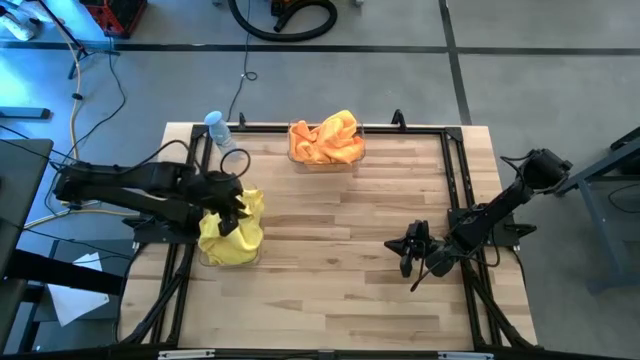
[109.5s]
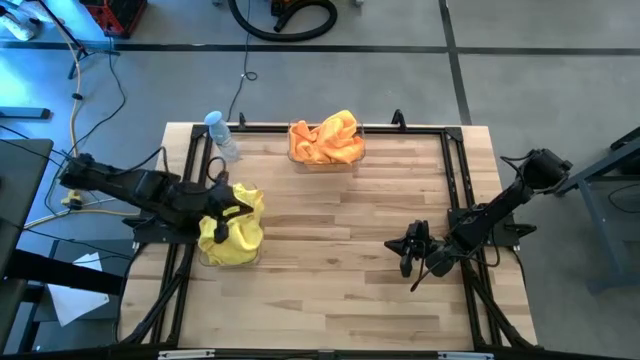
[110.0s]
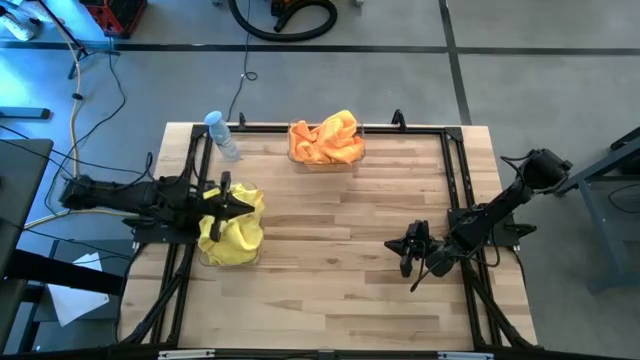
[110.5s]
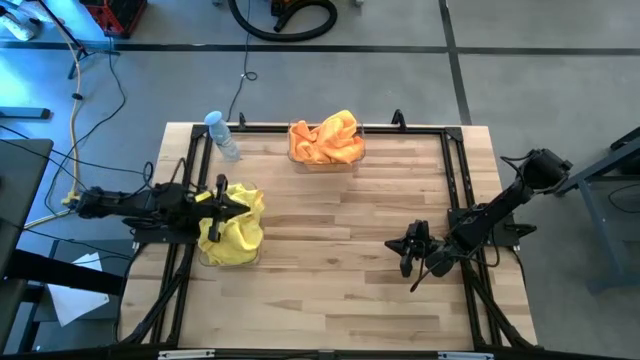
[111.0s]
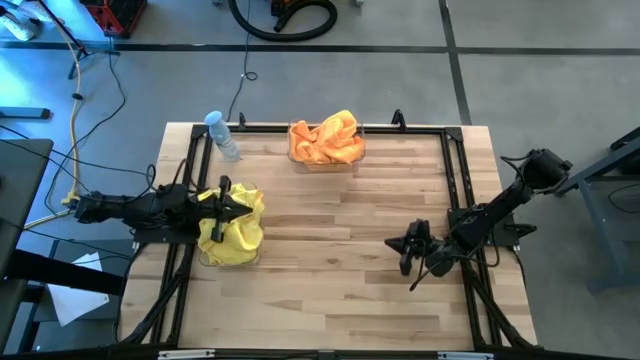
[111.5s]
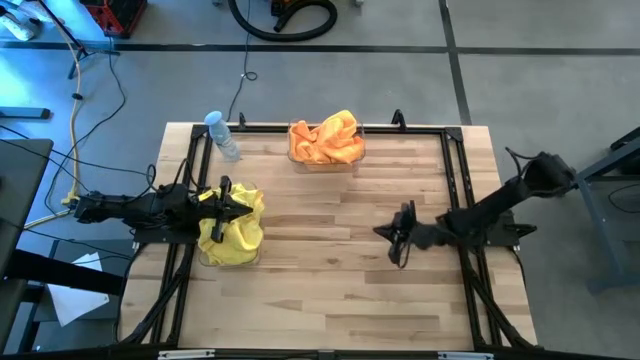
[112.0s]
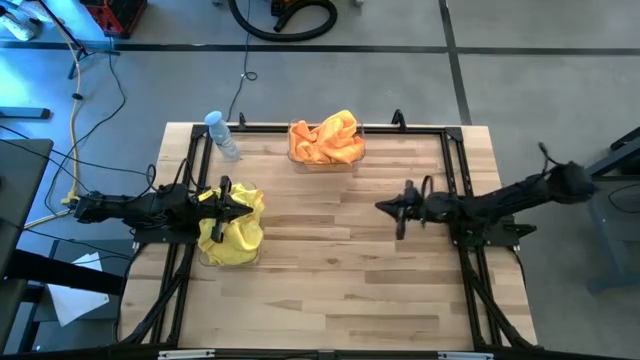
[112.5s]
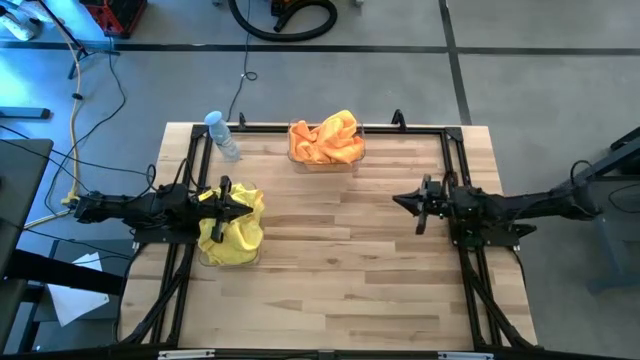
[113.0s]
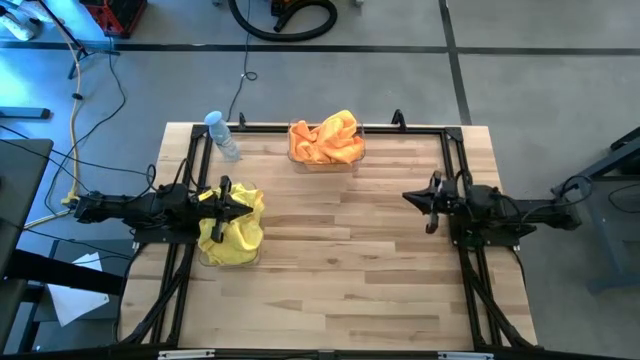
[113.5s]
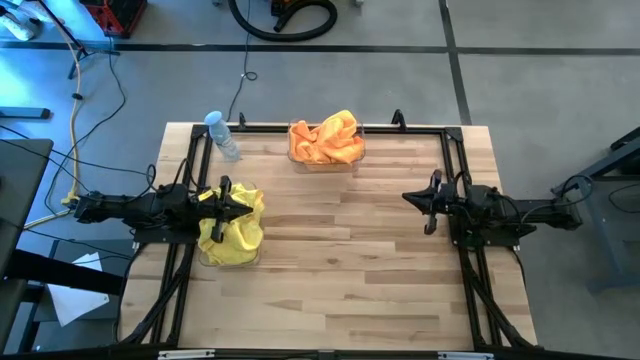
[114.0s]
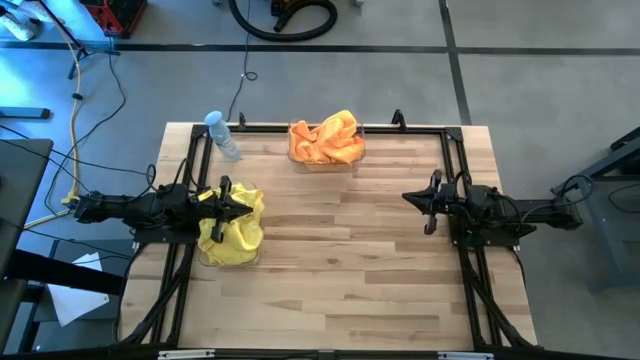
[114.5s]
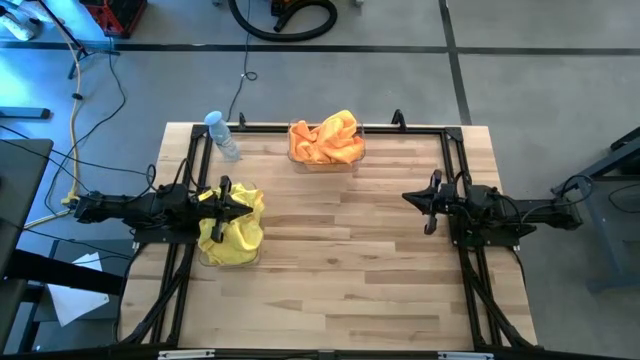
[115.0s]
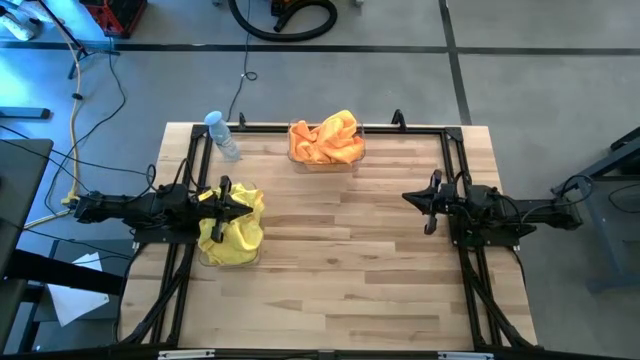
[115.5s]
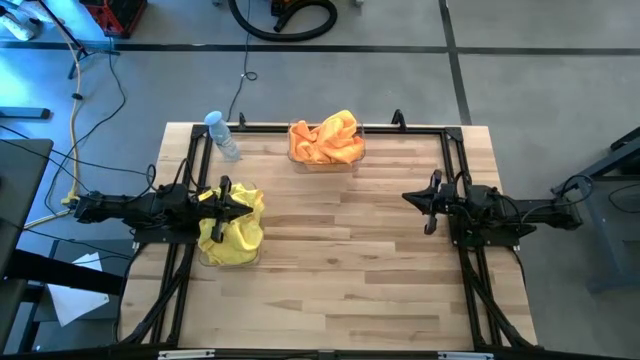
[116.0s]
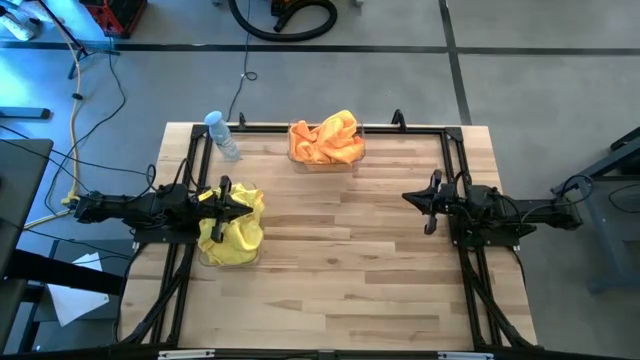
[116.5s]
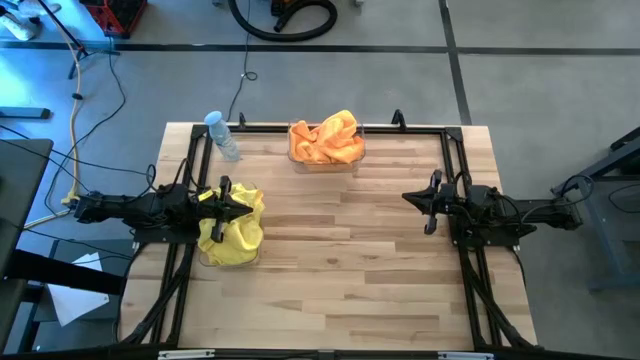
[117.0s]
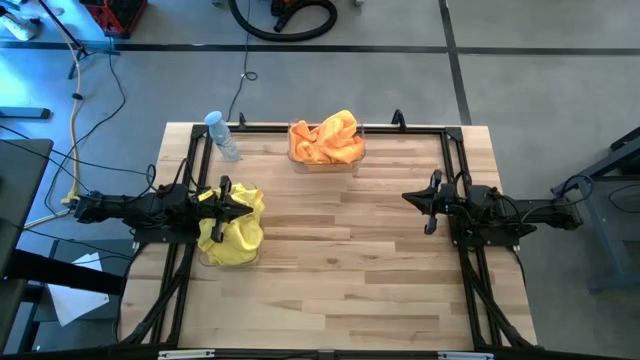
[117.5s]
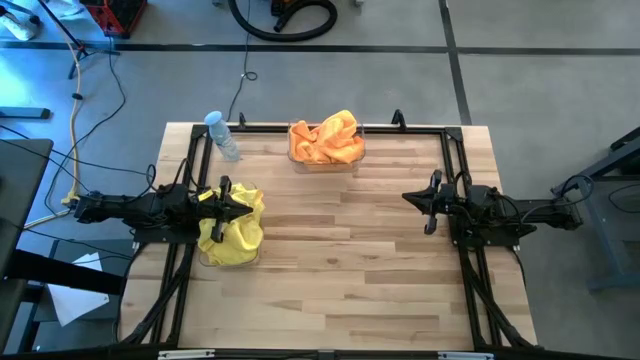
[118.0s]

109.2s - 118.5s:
Task: Sort microfiber towel by color & place in baskets
Return to Home Position

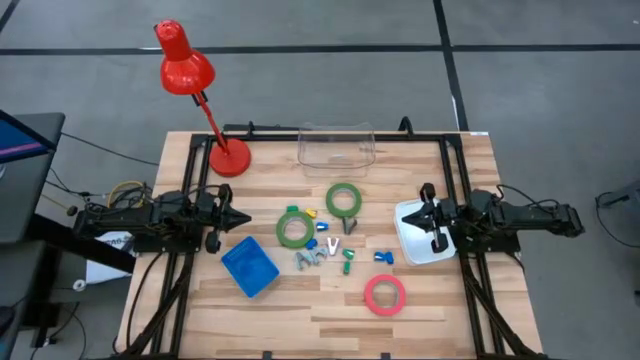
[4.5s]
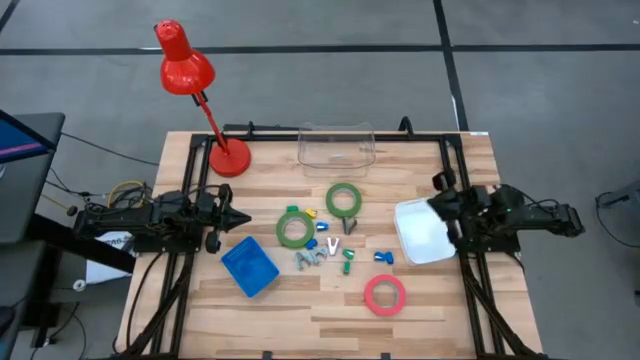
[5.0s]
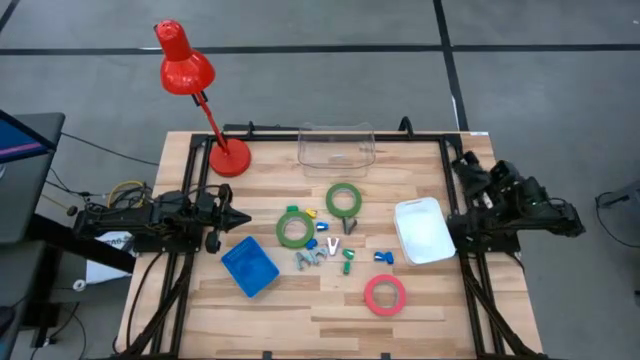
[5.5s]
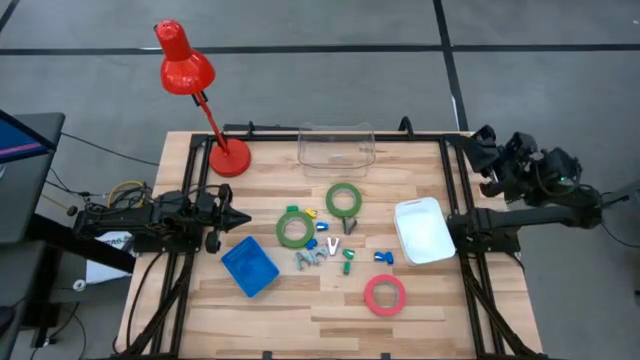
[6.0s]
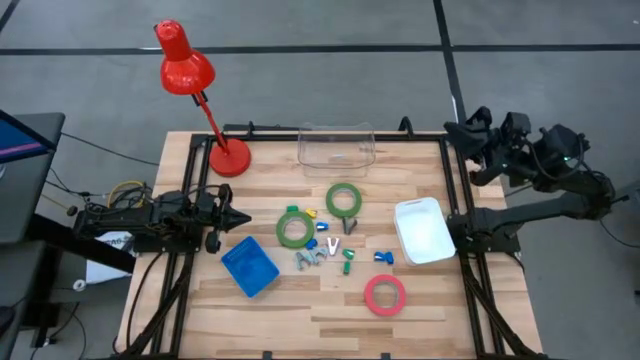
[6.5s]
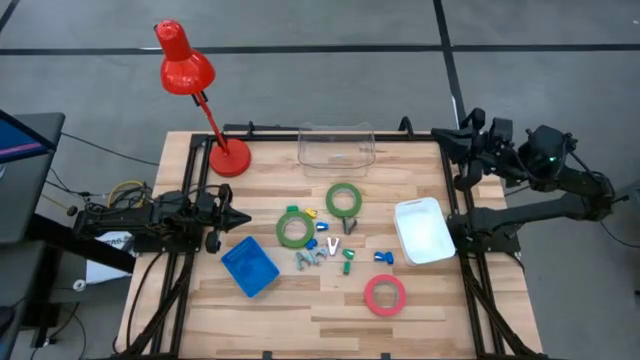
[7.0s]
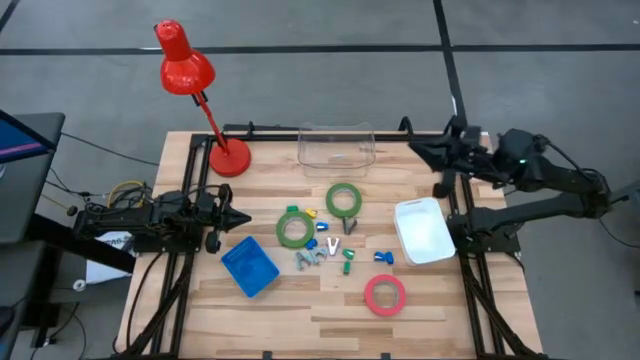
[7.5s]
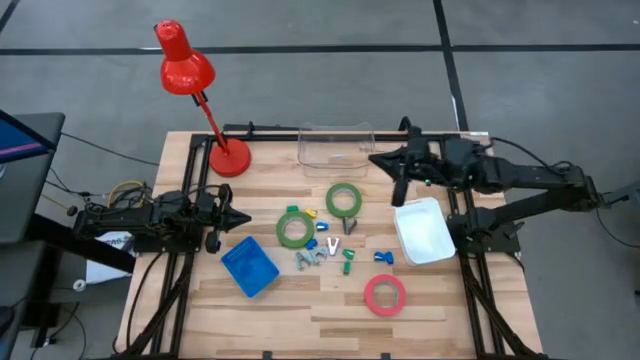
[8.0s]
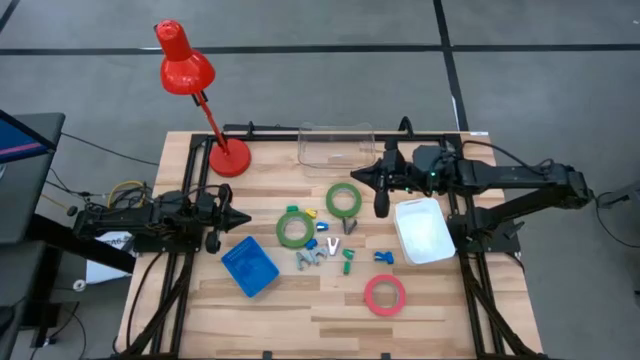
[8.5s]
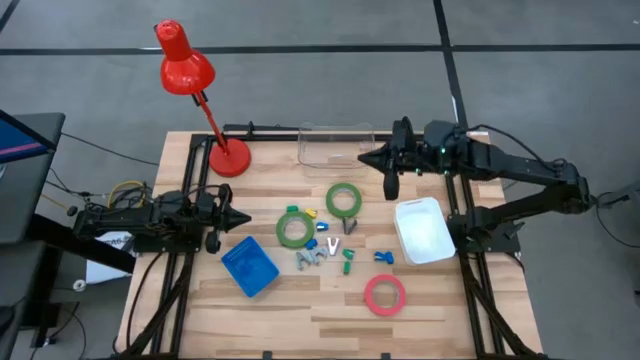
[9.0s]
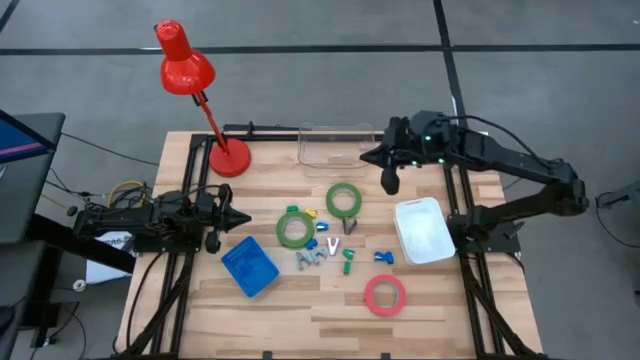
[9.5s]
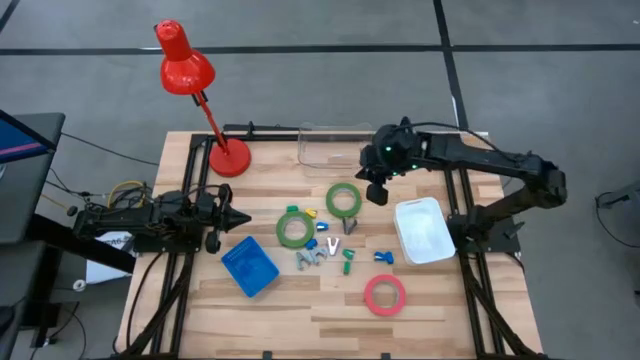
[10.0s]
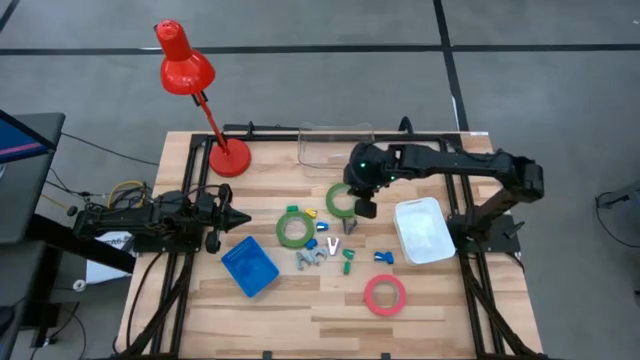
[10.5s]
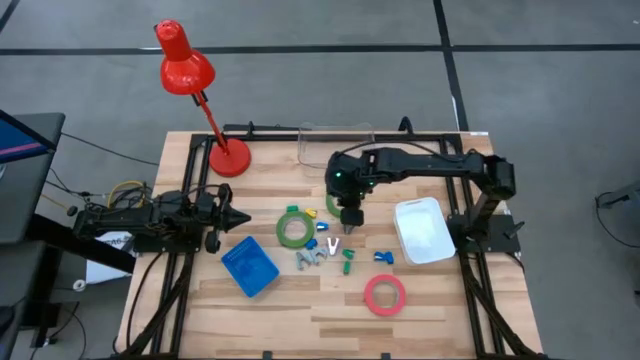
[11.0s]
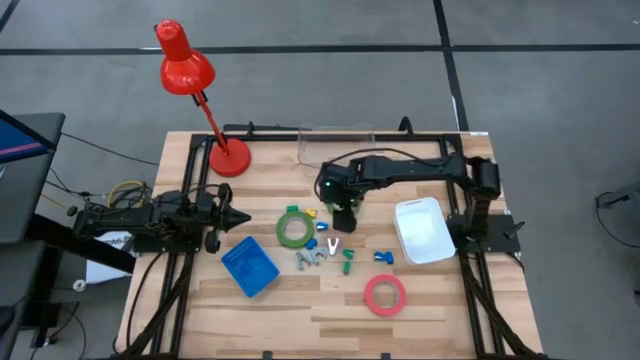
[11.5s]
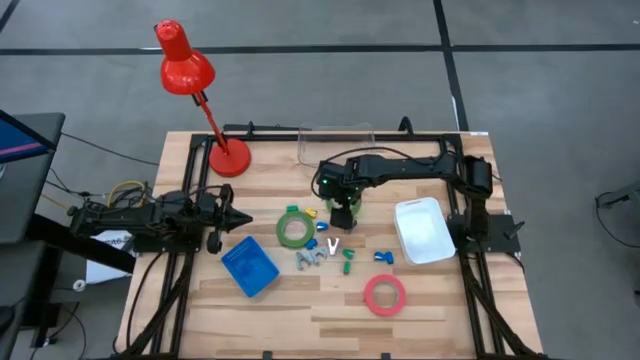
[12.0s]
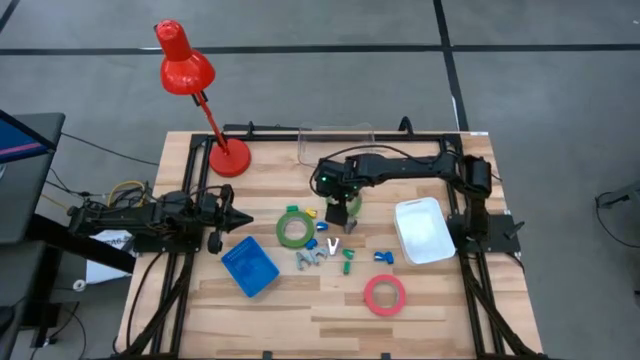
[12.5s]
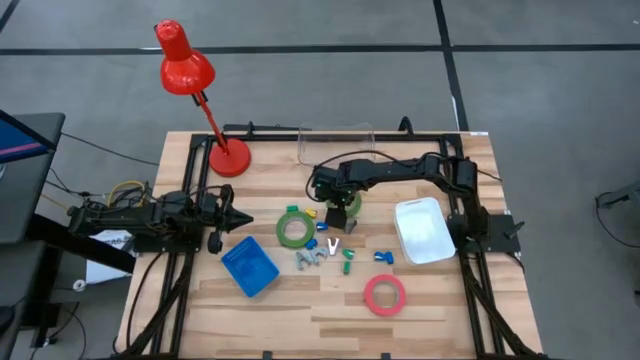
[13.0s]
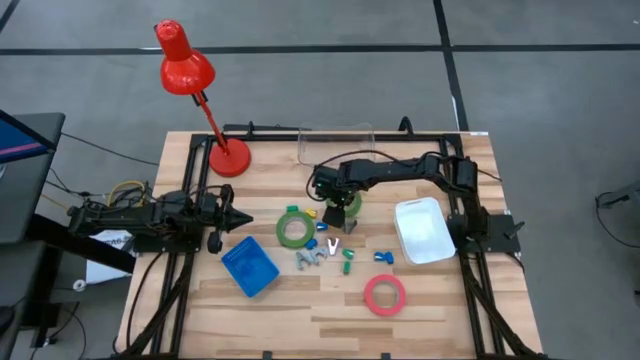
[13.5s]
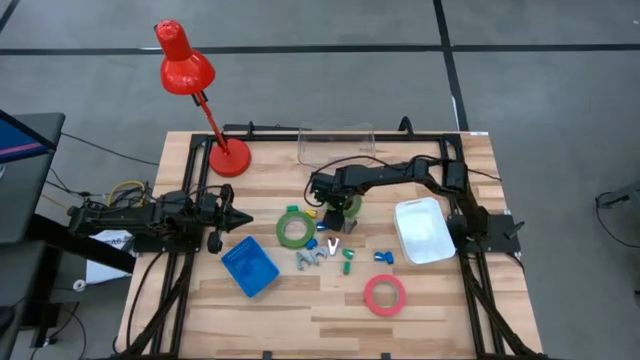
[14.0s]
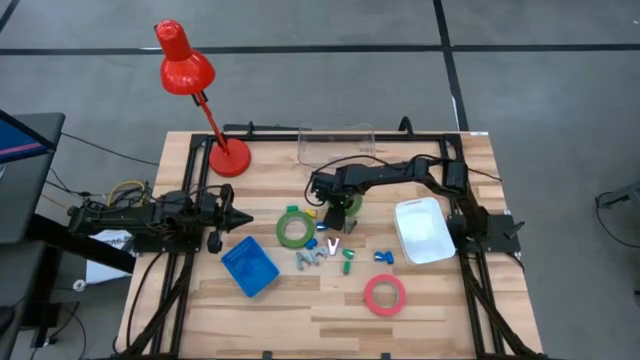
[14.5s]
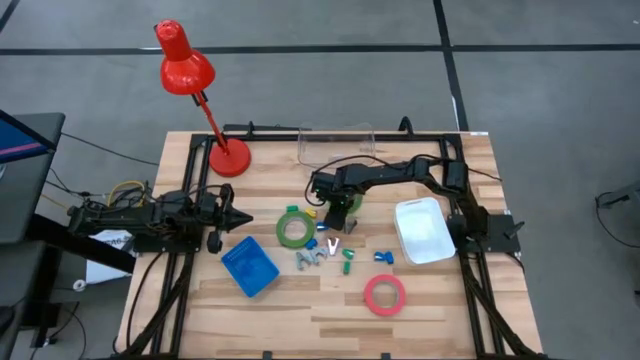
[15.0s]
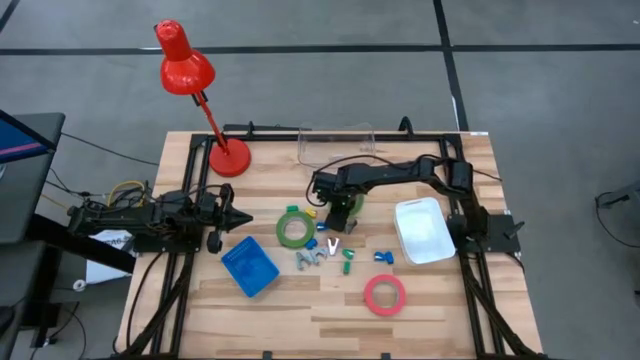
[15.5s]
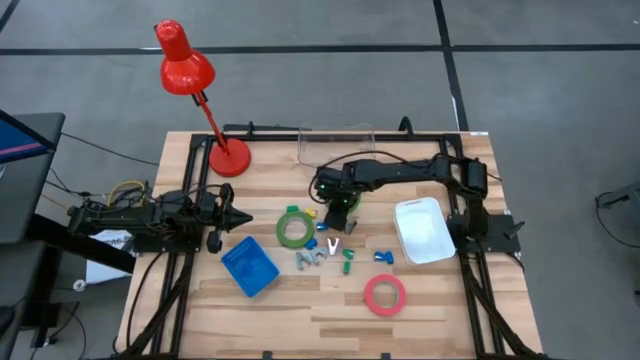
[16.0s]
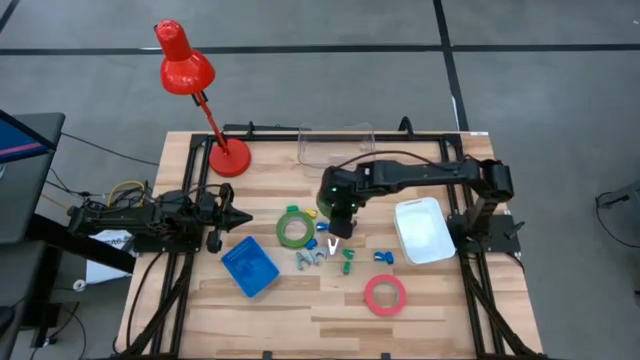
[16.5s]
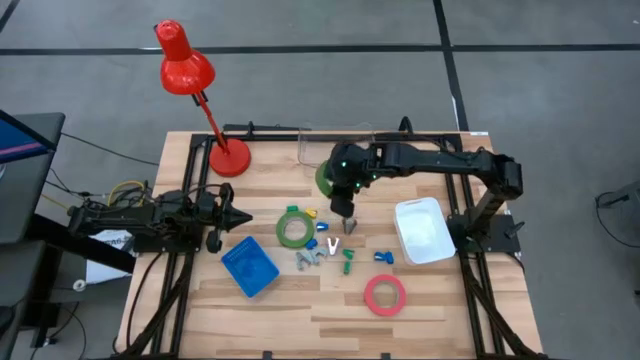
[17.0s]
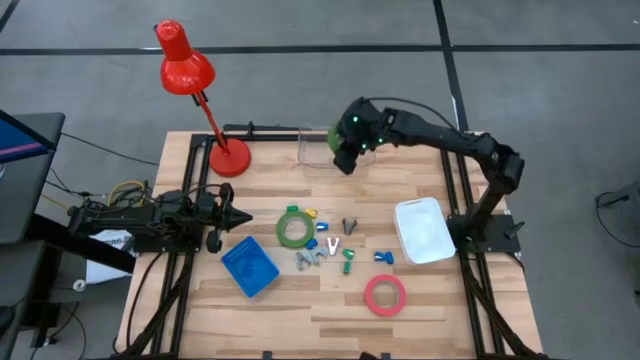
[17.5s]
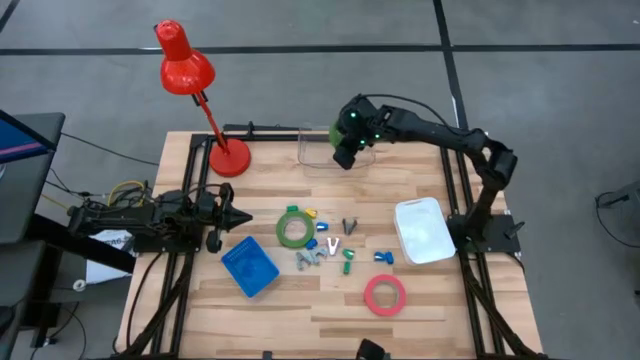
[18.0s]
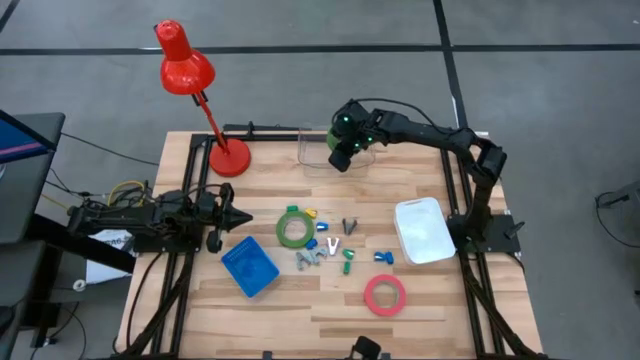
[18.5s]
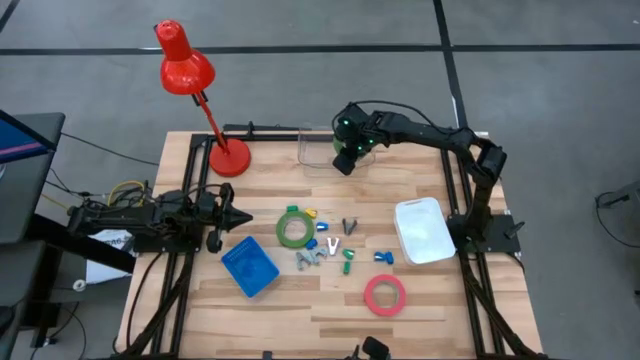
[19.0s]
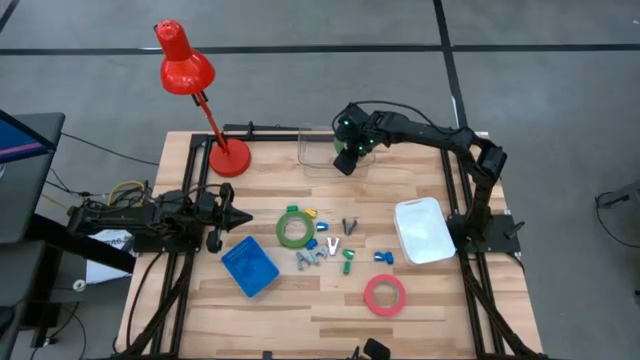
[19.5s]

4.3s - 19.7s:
Task: Pick and place Stapler, Stapler remover, tape
Put the right green tape into the transparent bin
